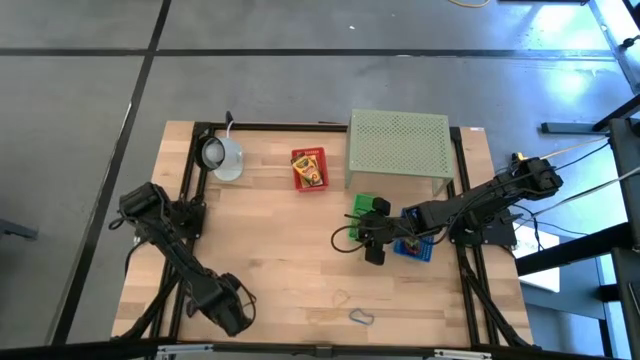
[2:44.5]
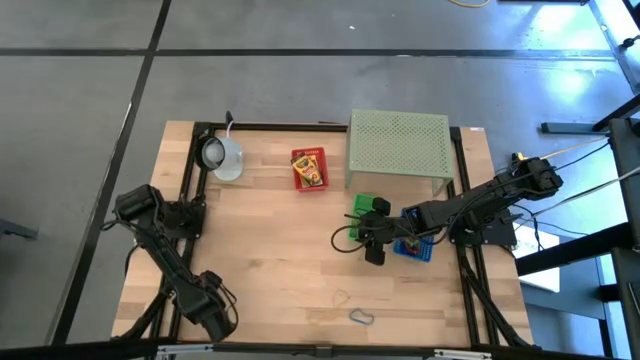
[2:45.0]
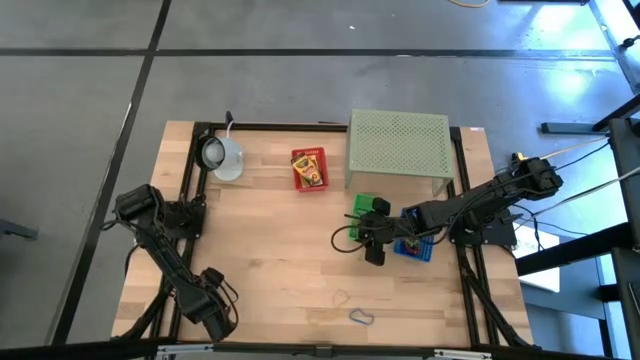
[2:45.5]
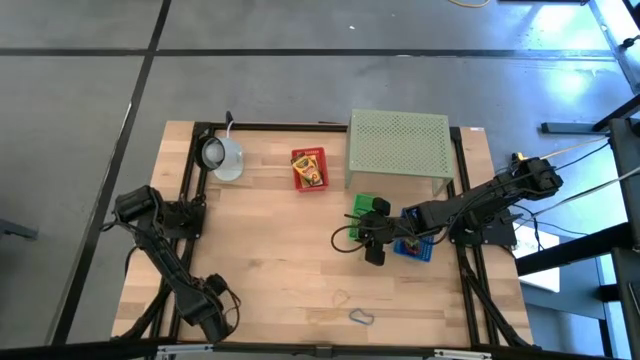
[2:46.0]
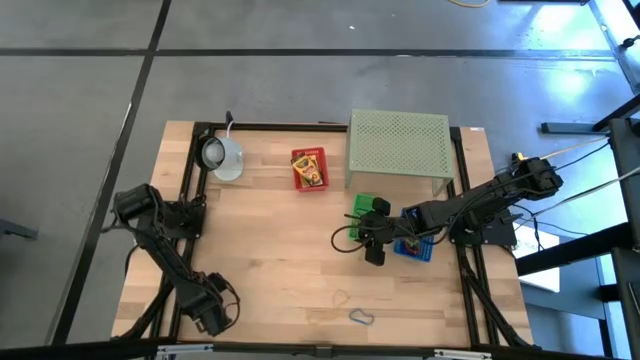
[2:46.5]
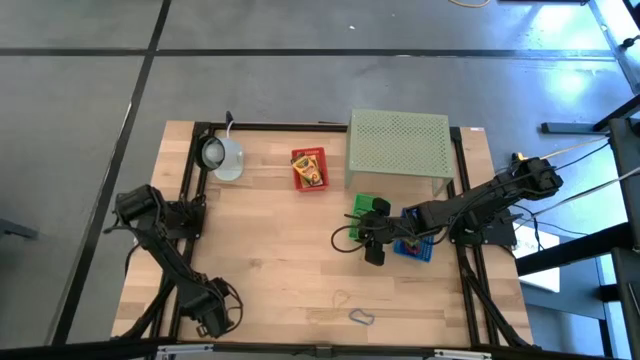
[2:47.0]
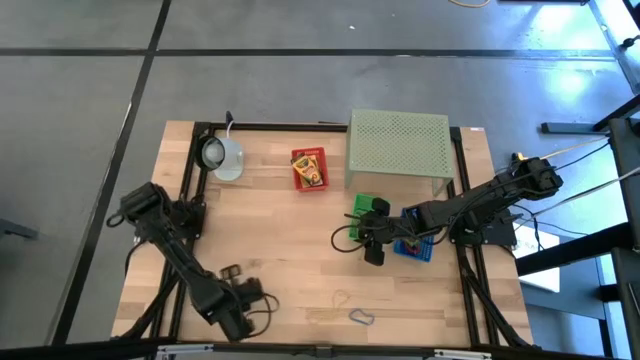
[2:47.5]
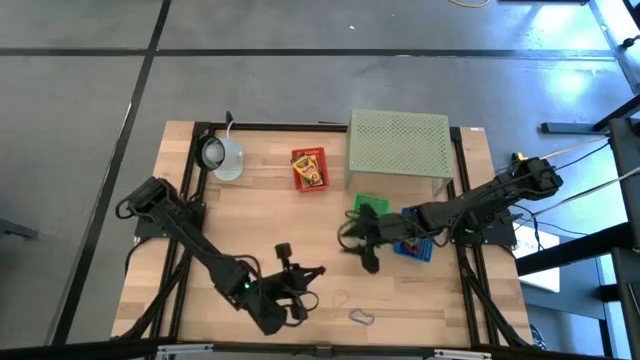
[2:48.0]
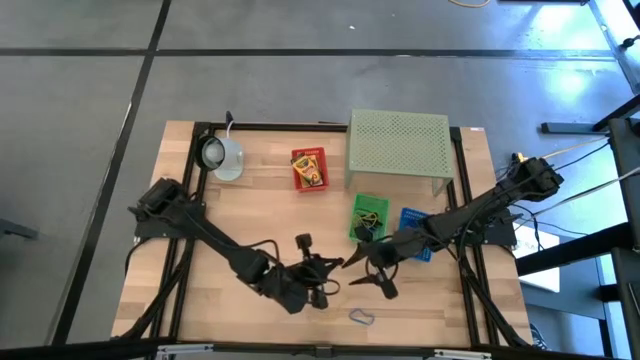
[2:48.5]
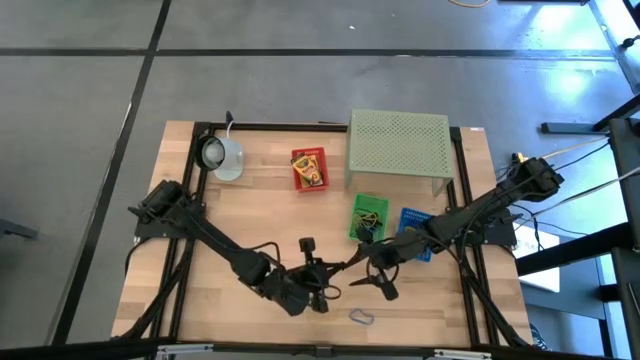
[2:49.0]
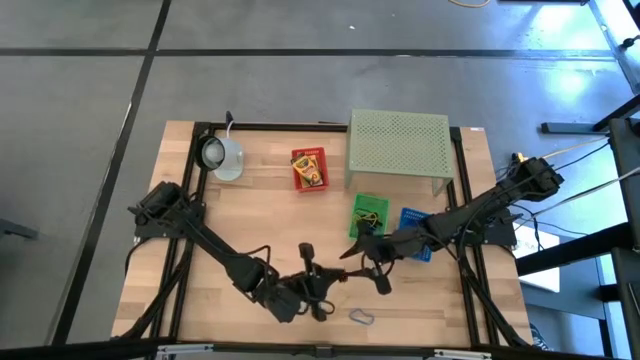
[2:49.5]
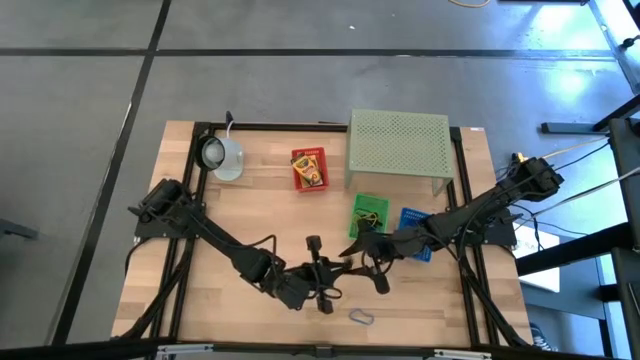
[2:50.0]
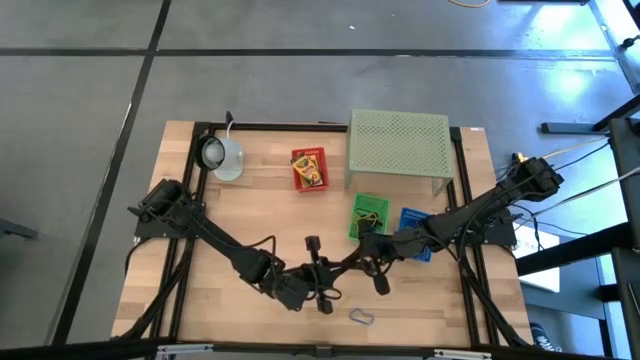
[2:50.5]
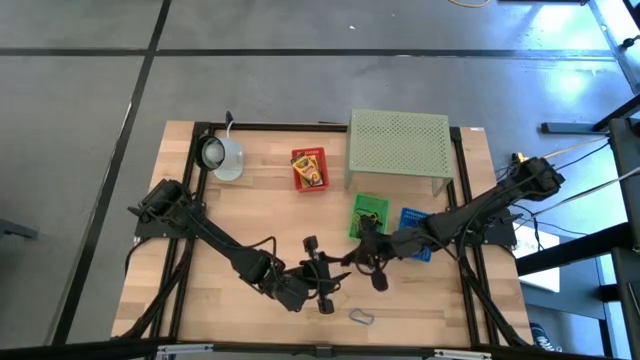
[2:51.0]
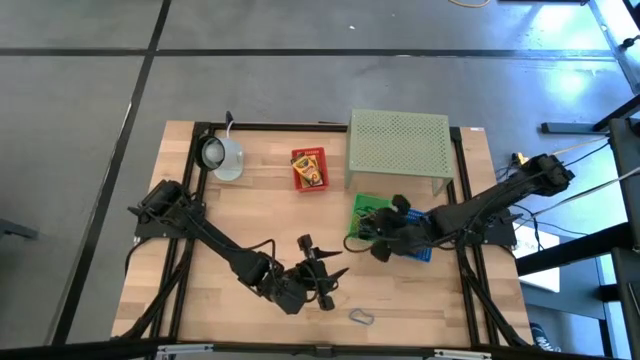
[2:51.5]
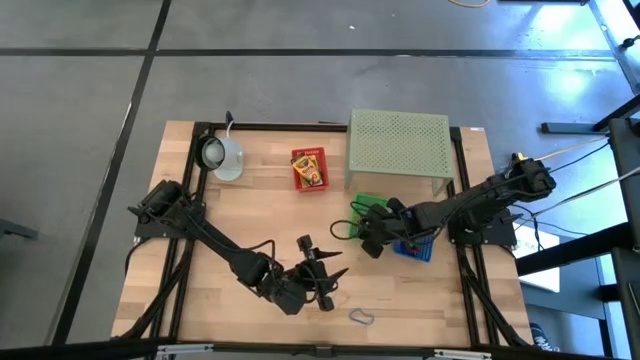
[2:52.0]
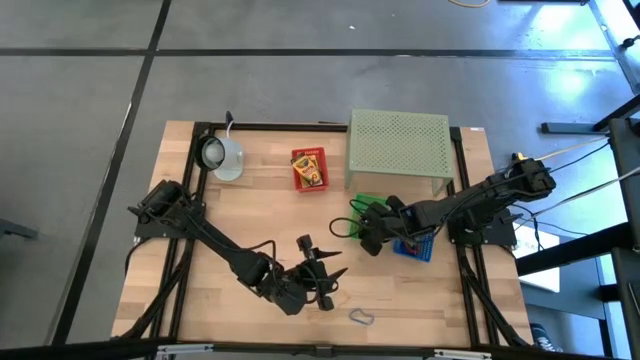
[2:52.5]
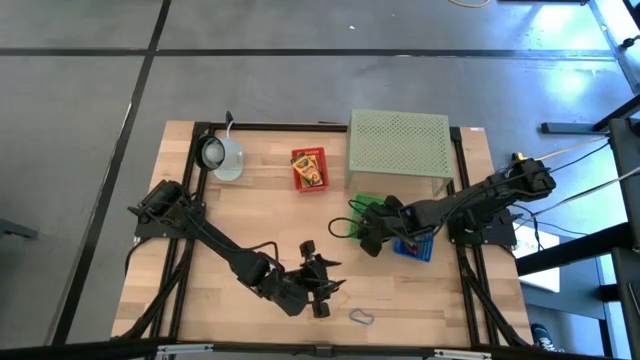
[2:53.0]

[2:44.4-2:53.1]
Task: Pick & Place Office Desk Supplies
Put the black rubber band into the green bin

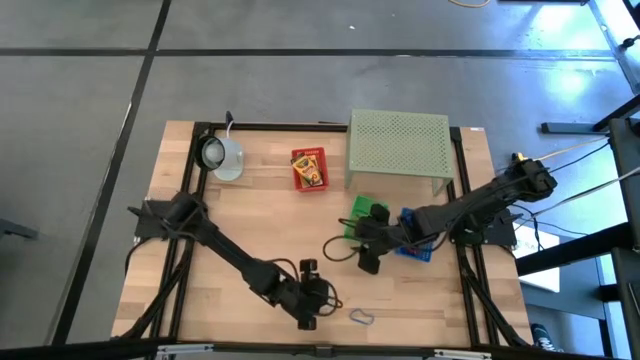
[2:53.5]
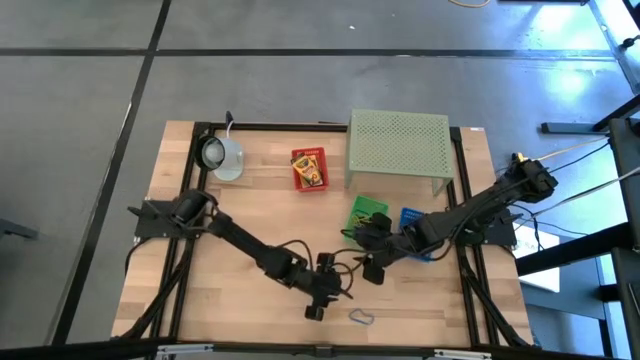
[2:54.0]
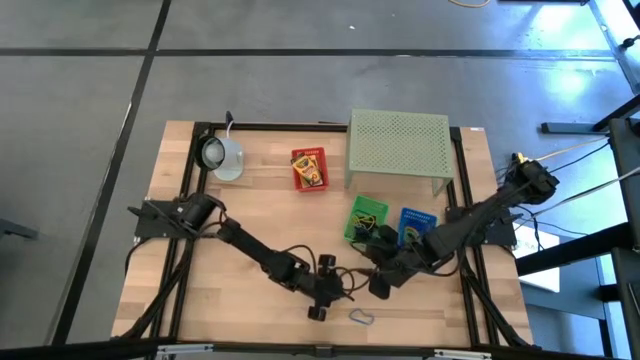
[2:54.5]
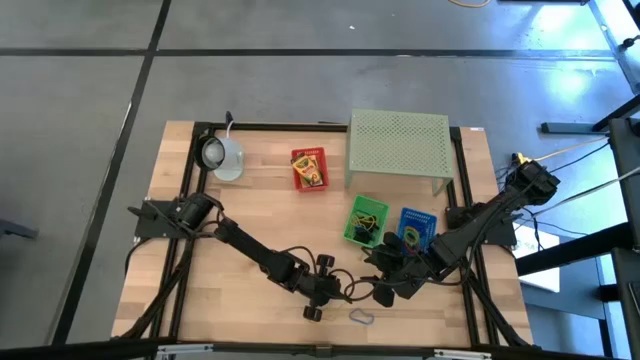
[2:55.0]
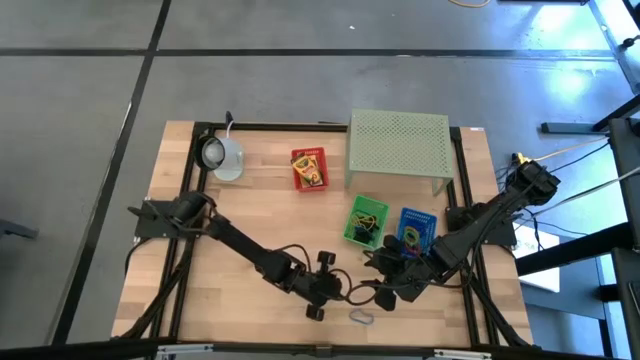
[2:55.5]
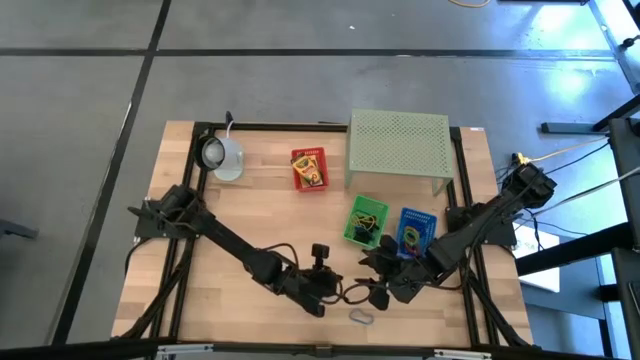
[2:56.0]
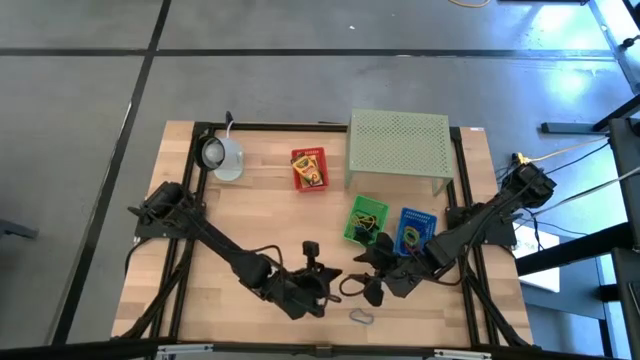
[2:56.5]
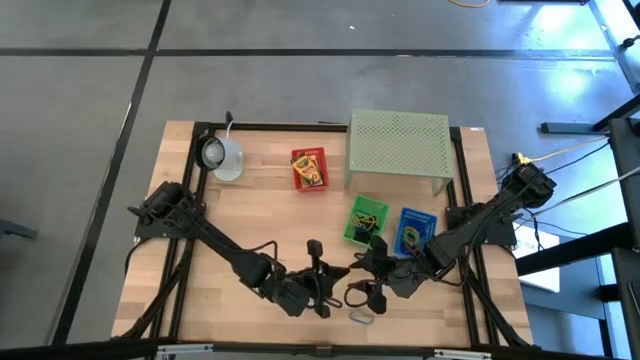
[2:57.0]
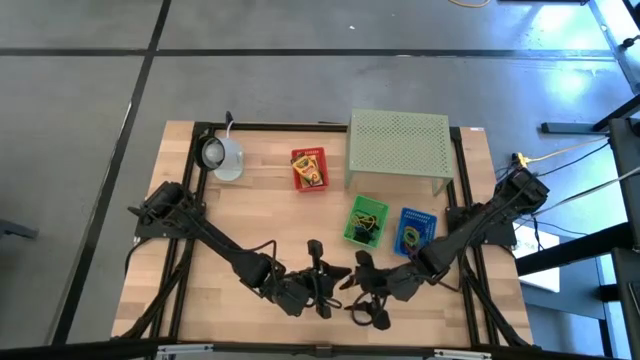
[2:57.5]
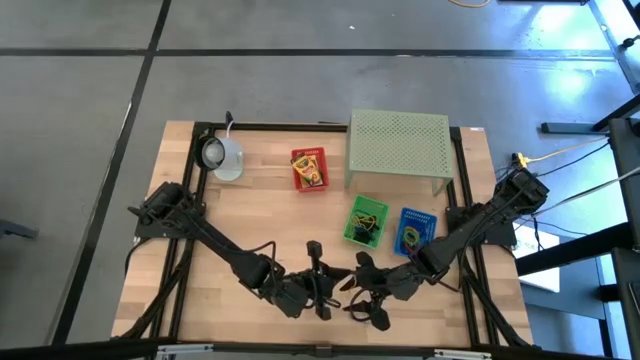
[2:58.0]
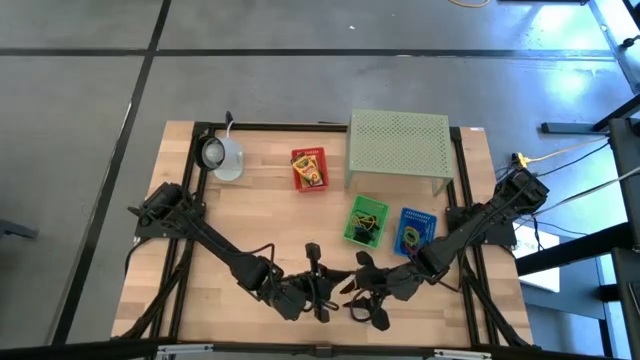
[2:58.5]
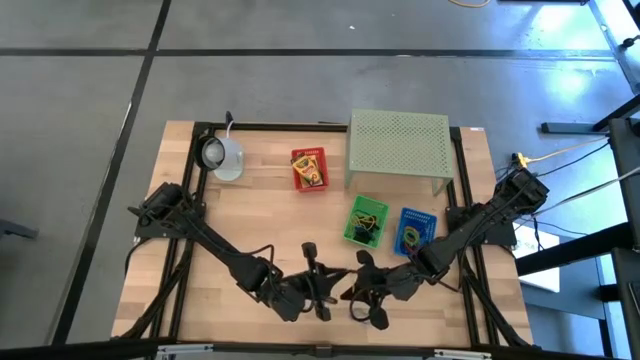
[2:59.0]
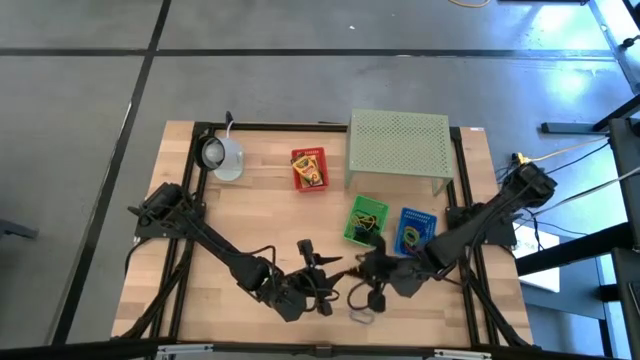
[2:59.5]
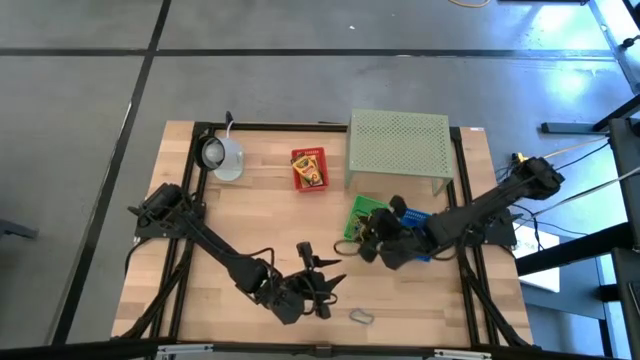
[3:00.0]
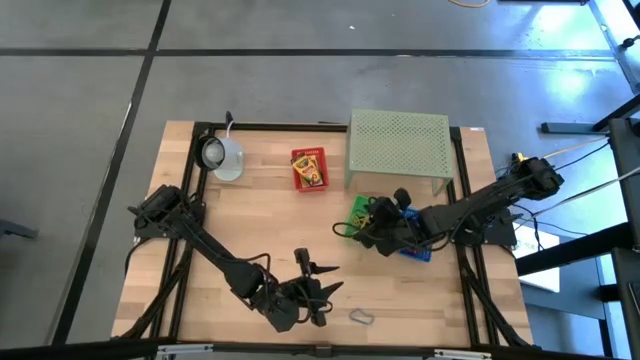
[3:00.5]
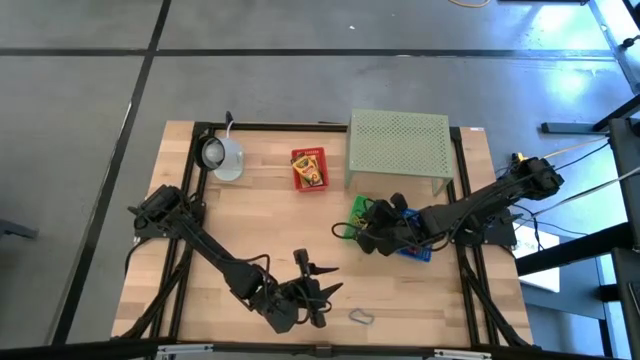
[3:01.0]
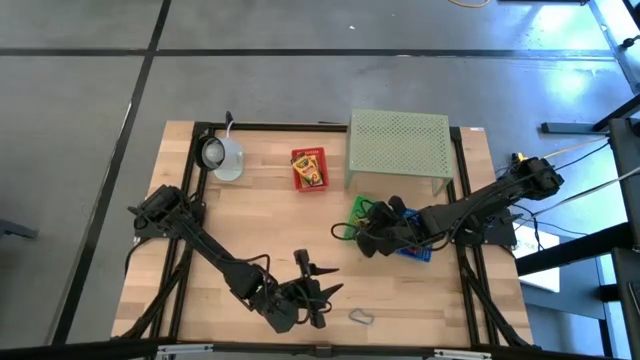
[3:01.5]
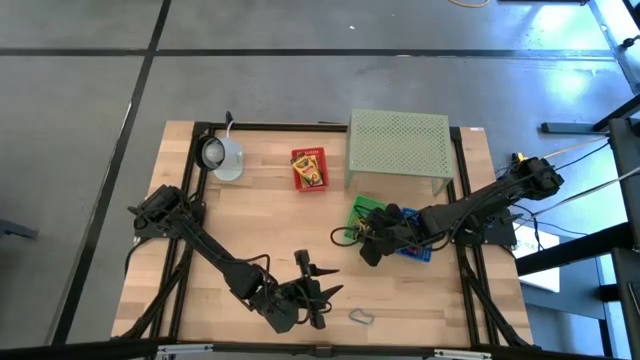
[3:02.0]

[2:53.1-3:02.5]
Put the yellow rubber band into the green bin

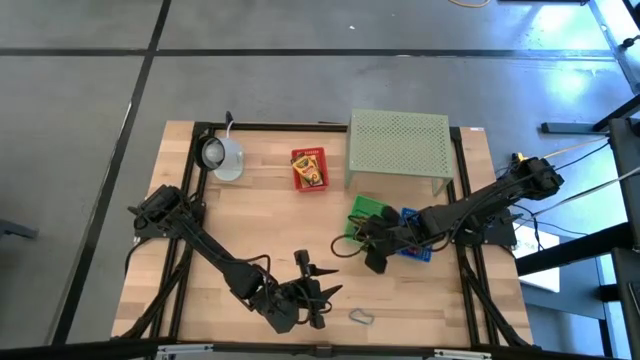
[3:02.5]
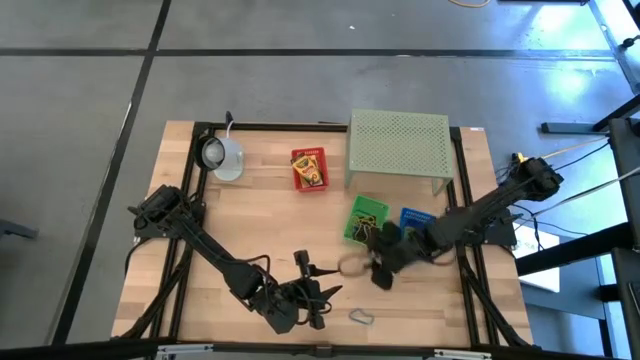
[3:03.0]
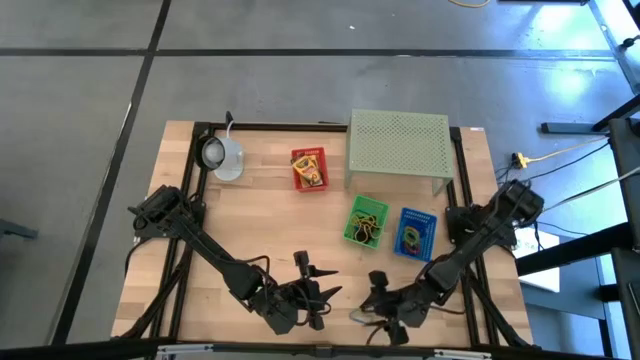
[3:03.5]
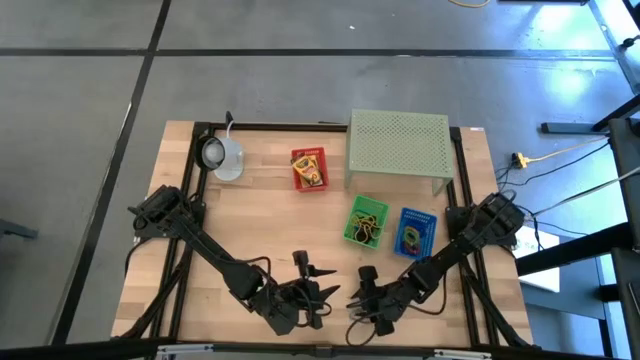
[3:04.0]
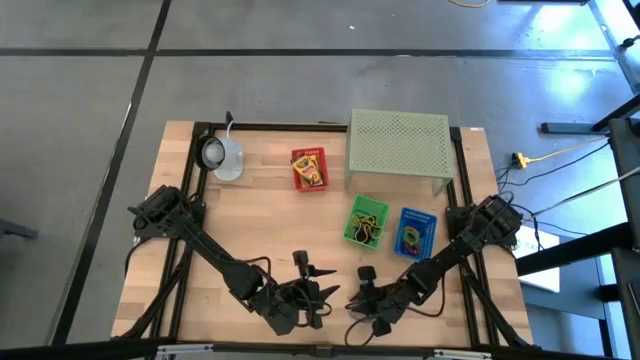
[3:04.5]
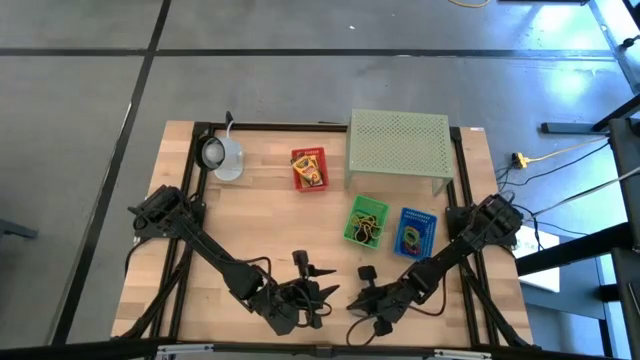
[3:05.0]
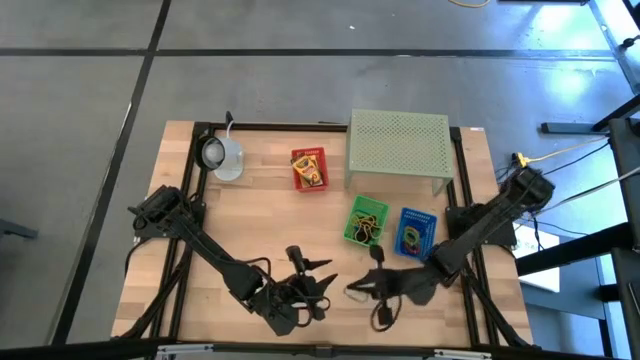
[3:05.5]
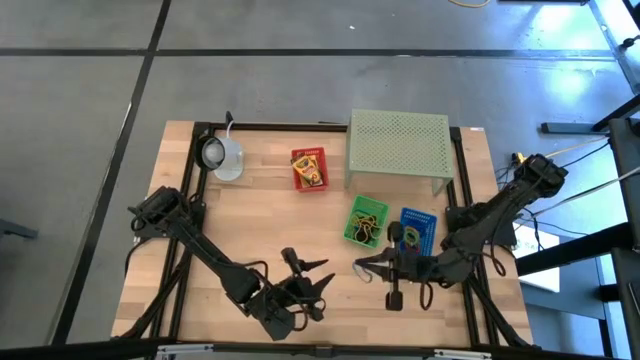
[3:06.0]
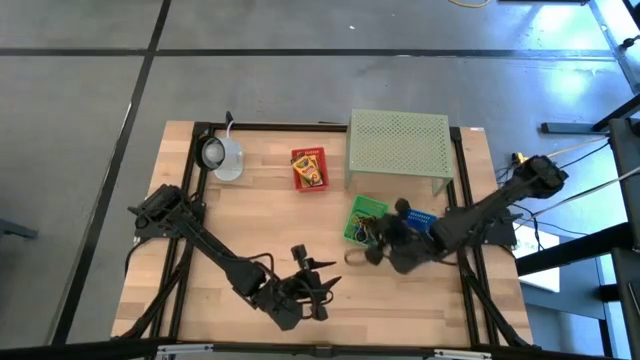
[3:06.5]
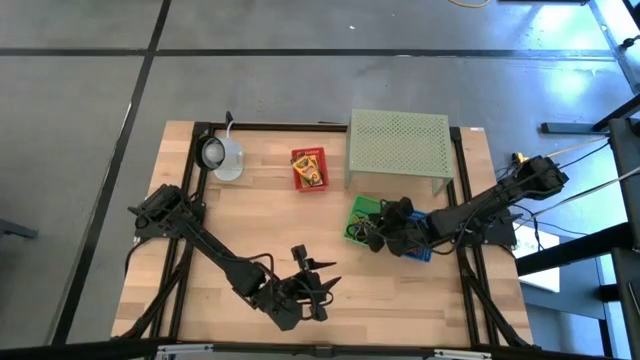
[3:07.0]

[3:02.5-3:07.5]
Put the blue rubber band into the green bin
